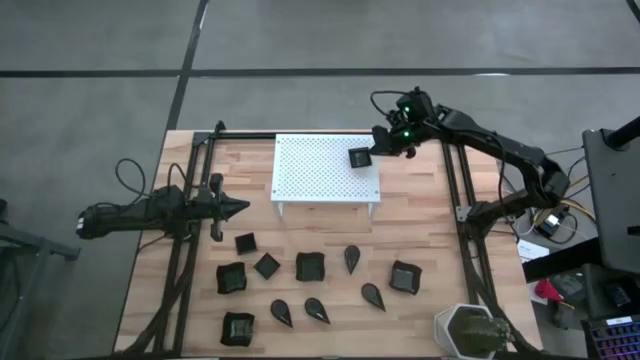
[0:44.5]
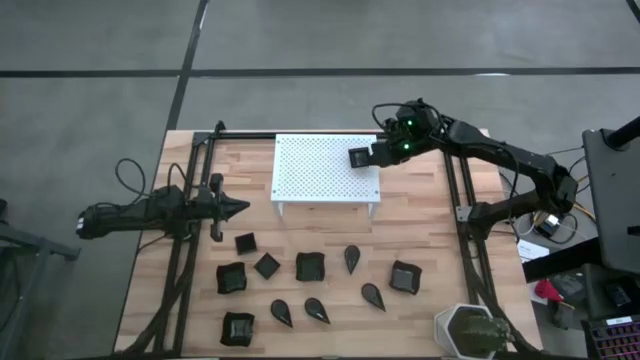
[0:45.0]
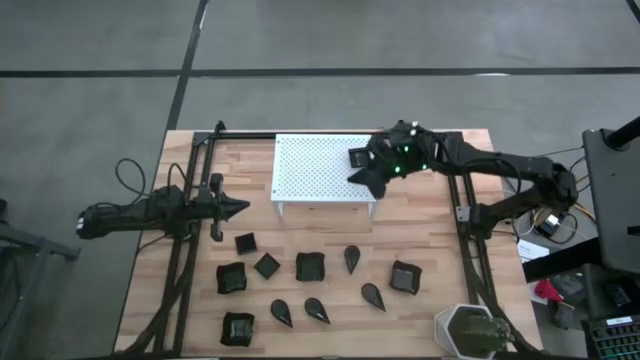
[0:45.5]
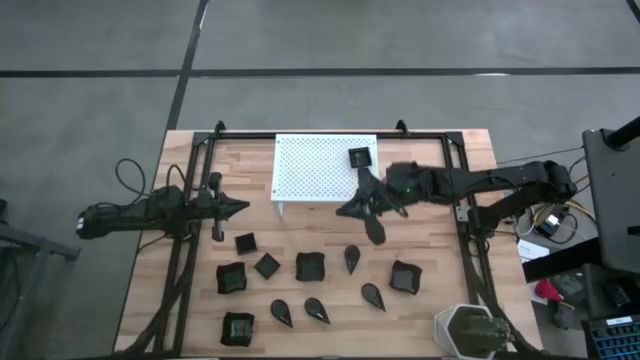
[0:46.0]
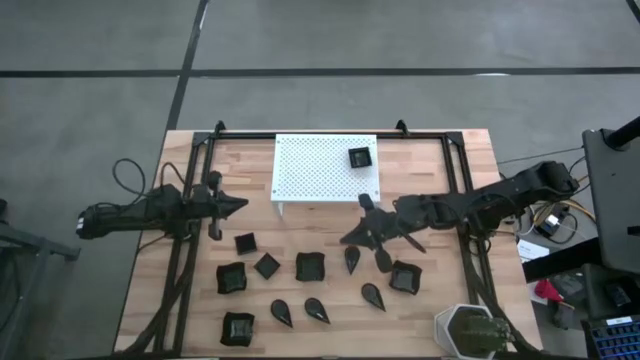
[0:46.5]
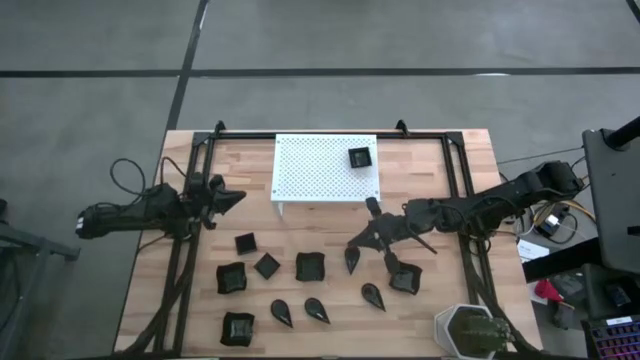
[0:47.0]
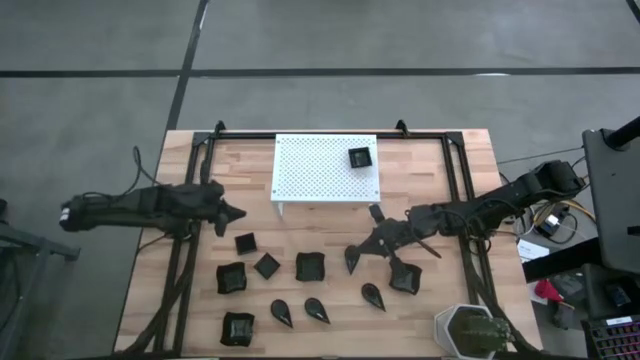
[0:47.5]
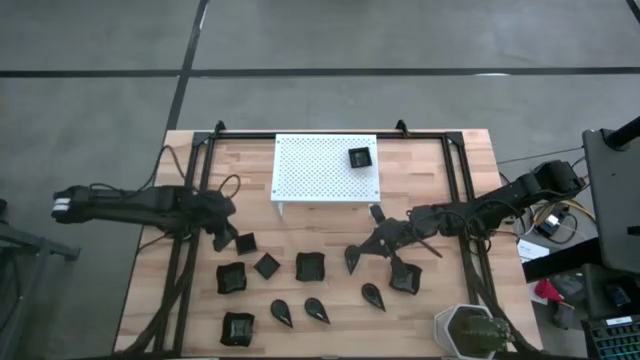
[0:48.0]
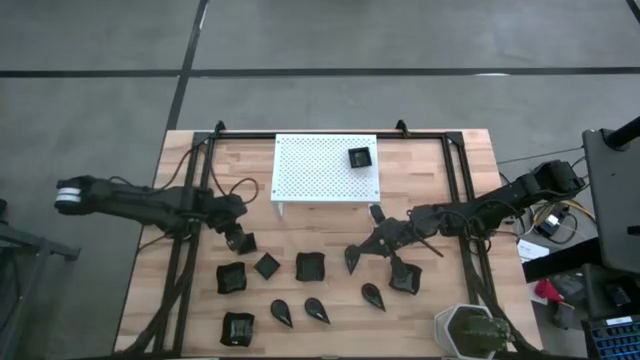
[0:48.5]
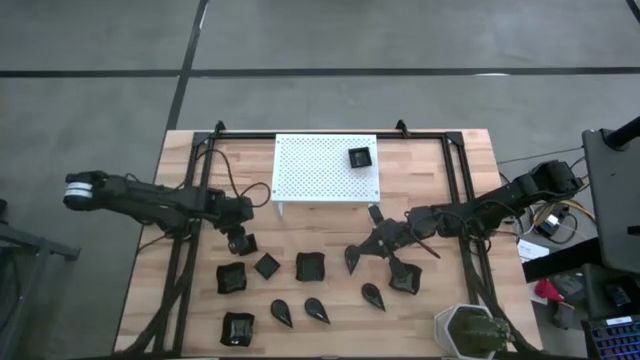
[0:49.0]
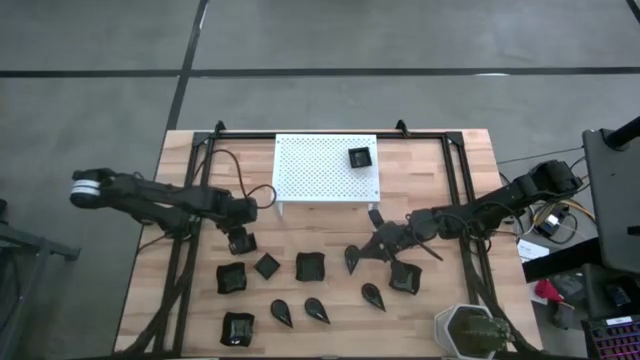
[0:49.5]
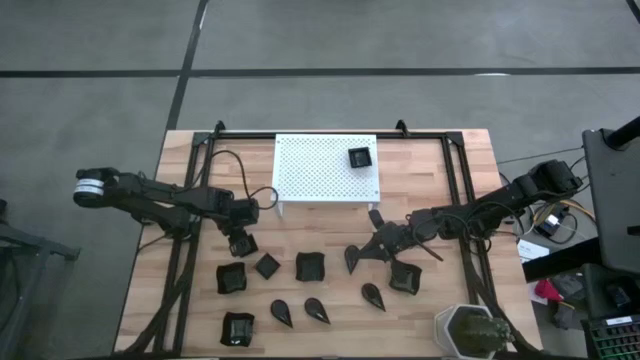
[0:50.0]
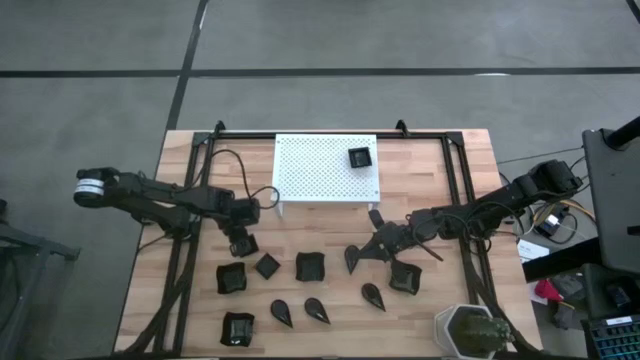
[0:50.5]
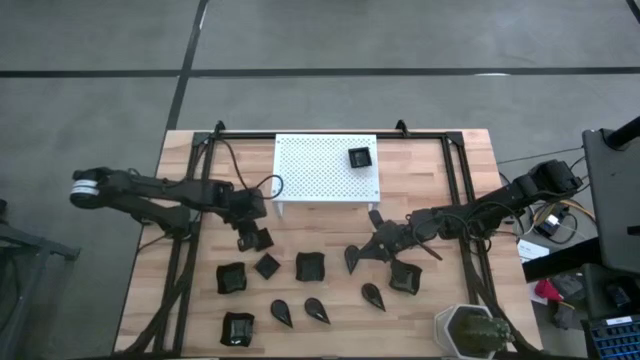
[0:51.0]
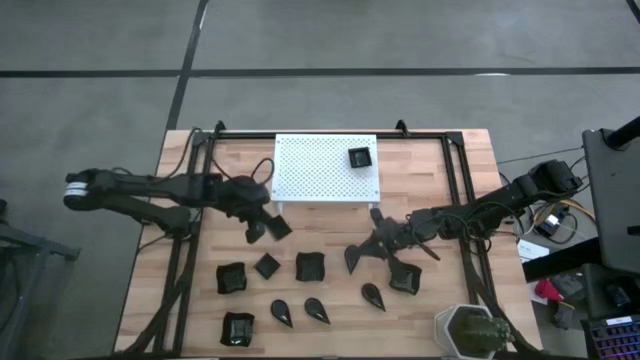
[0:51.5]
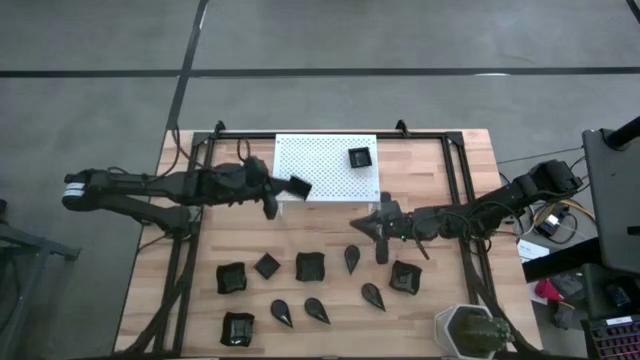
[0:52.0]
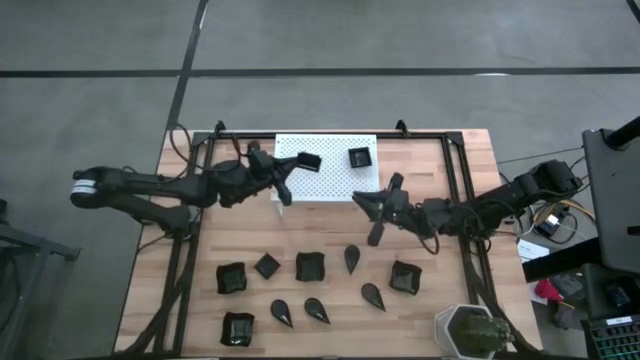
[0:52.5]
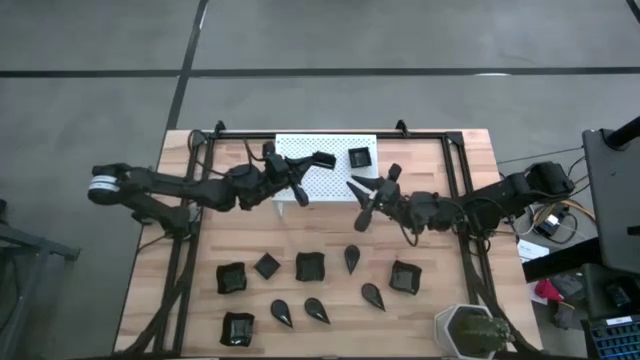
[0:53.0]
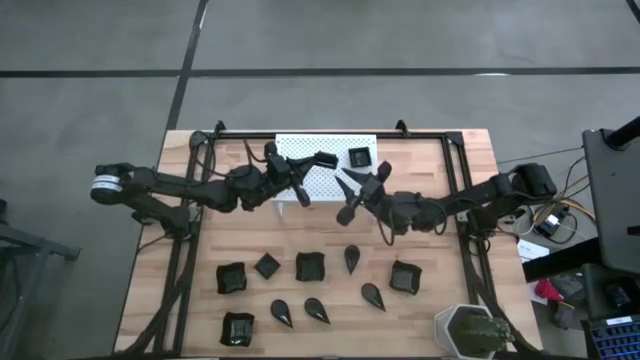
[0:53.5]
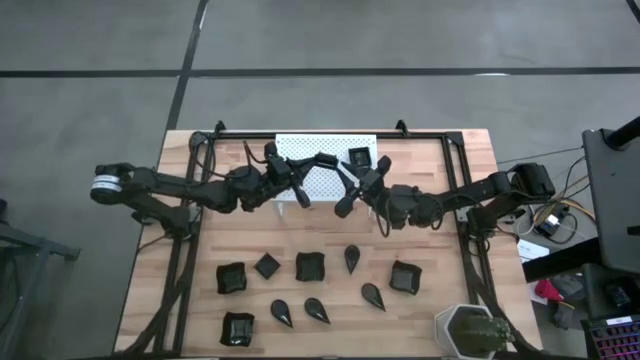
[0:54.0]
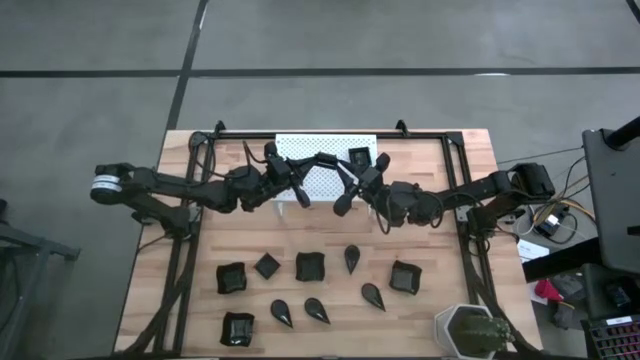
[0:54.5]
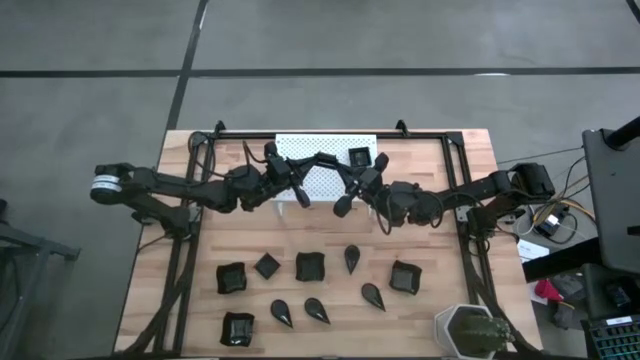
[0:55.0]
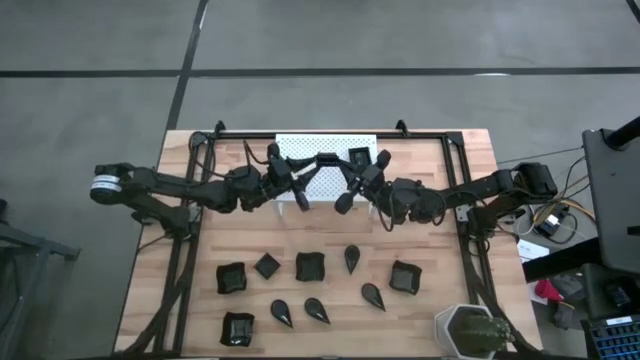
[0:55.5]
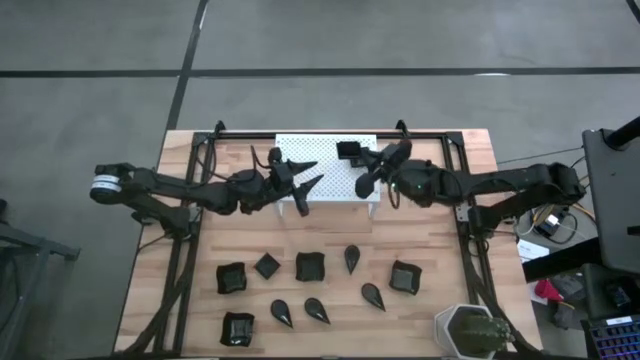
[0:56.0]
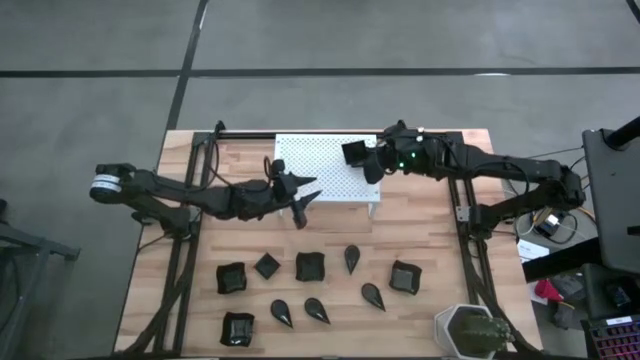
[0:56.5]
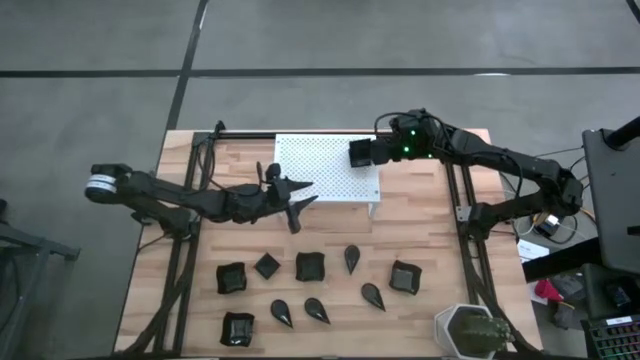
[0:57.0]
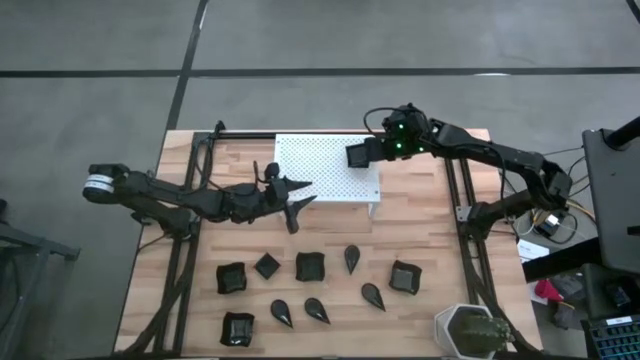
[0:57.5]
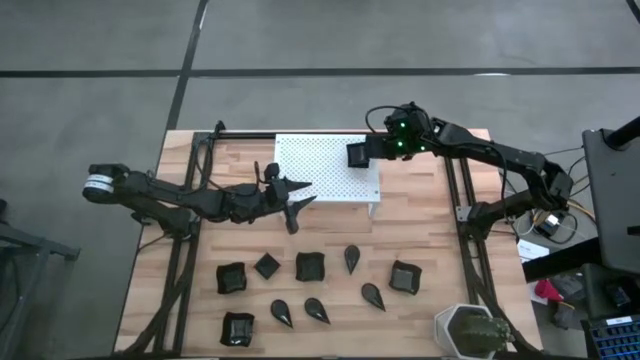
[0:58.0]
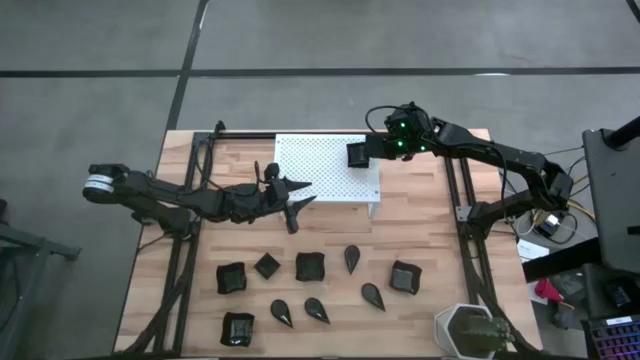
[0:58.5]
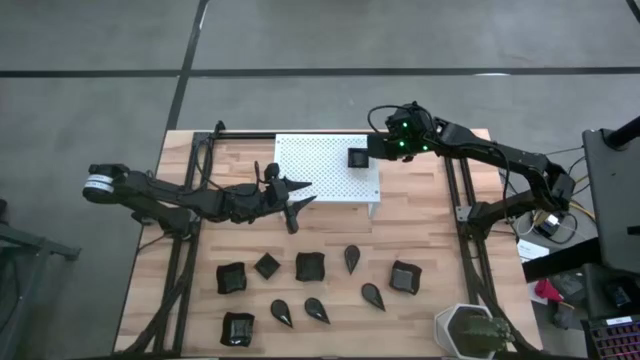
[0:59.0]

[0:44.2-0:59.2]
Task: Pick & Place Mini shaped plates
Stack the square plate on top of the square plate on the shelf

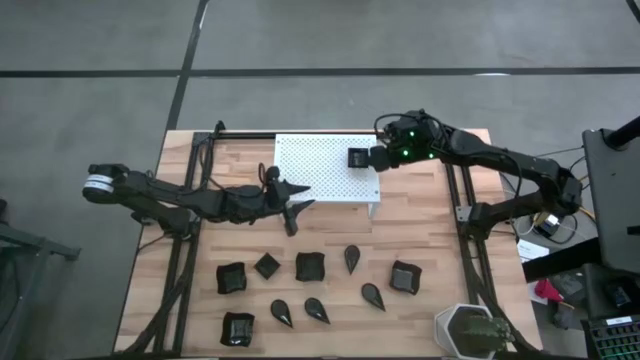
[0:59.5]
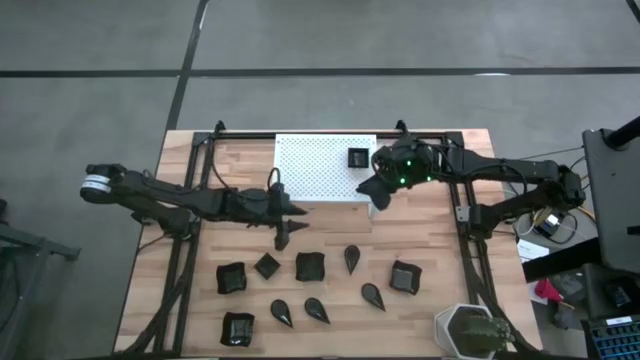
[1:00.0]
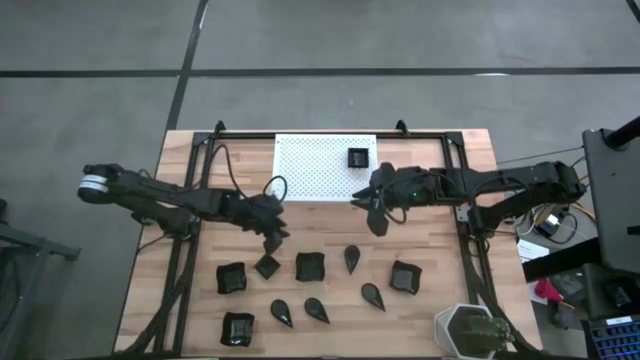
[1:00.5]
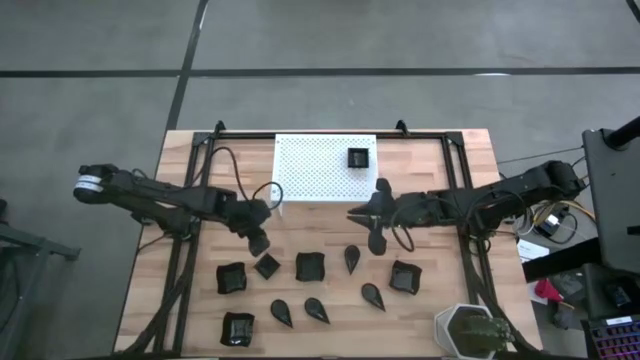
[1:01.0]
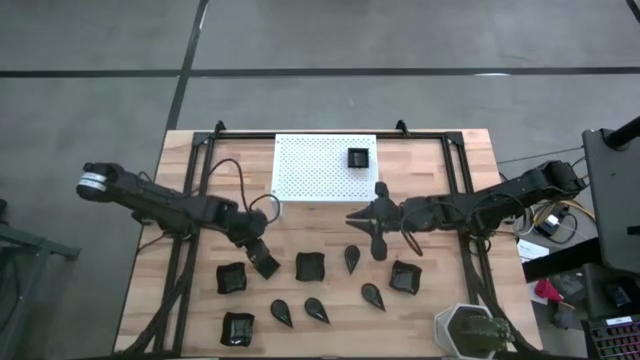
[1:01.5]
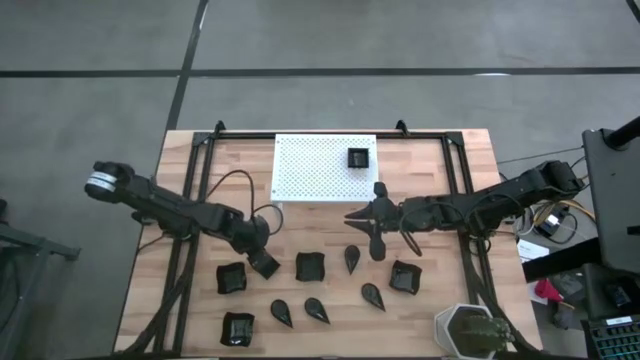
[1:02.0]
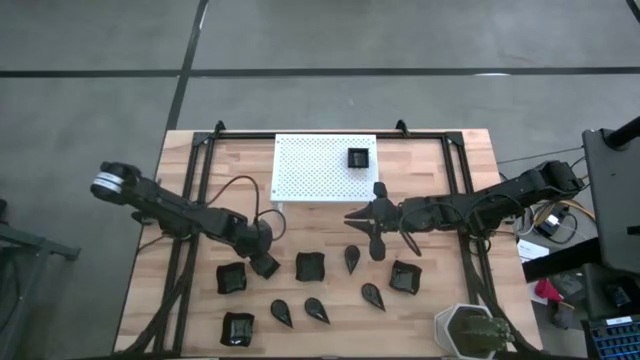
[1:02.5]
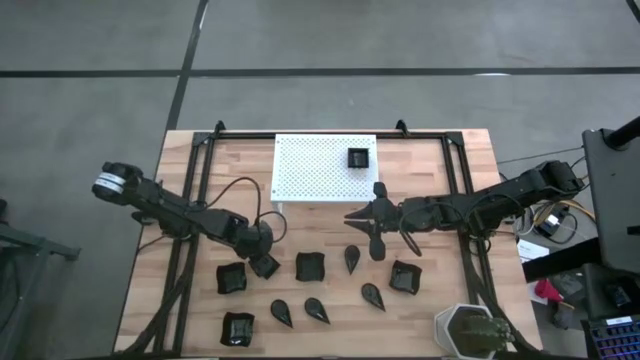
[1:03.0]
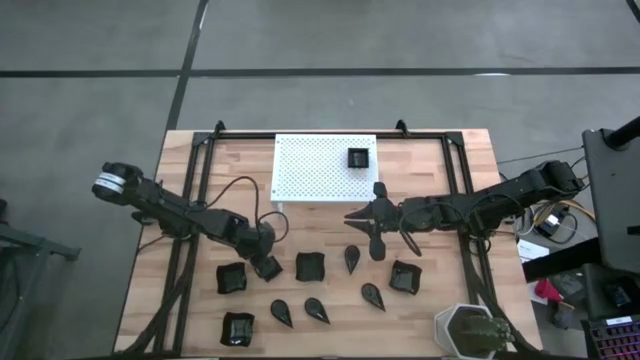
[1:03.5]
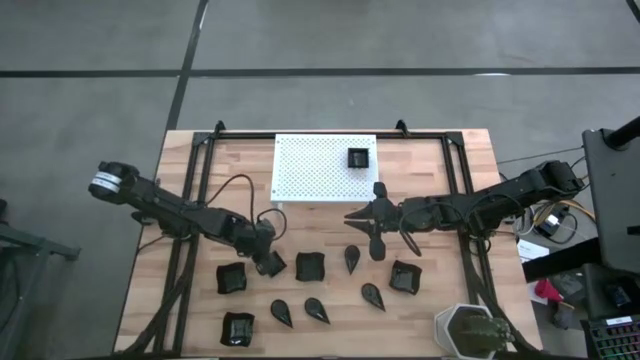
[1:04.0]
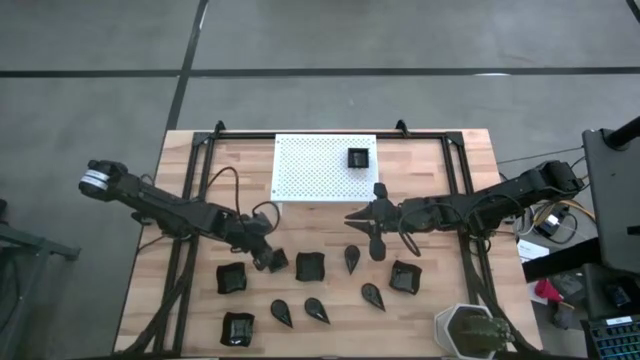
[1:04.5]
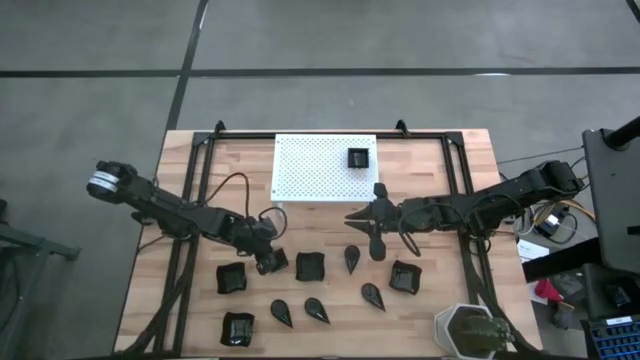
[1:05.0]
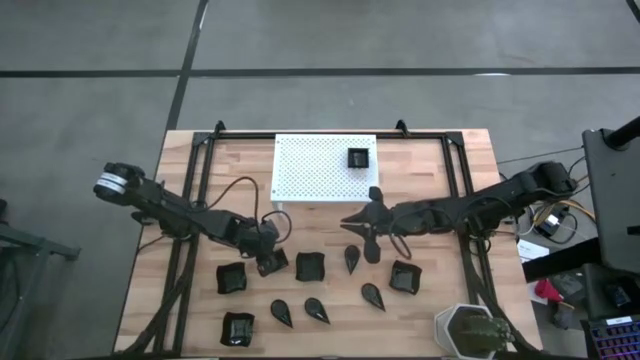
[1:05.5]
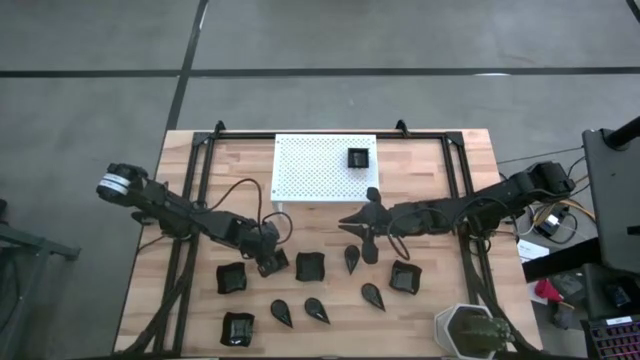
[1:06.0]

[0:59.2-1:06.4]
Stack the square plate on top of the square plate on the shelf
